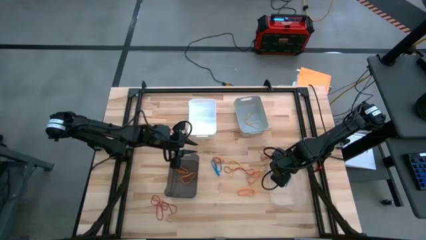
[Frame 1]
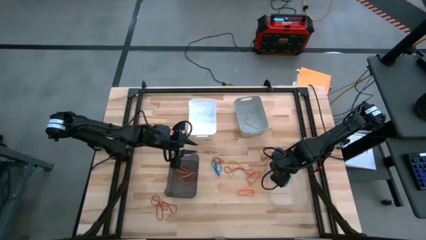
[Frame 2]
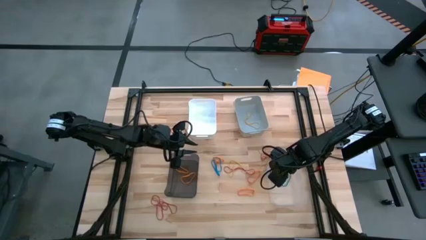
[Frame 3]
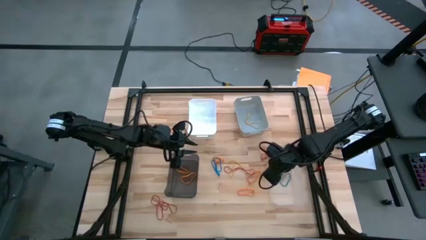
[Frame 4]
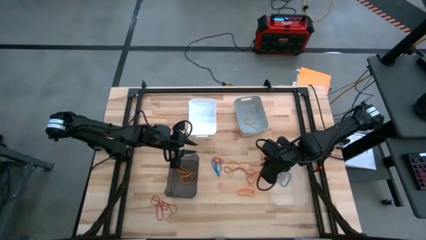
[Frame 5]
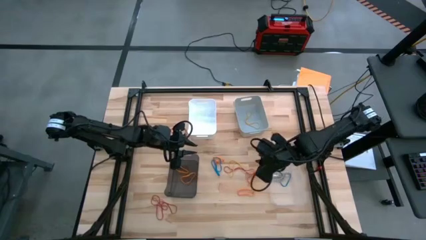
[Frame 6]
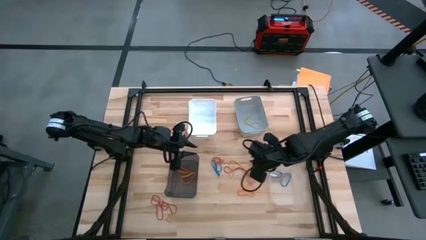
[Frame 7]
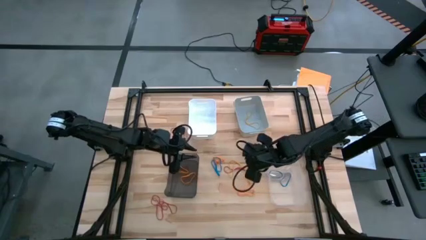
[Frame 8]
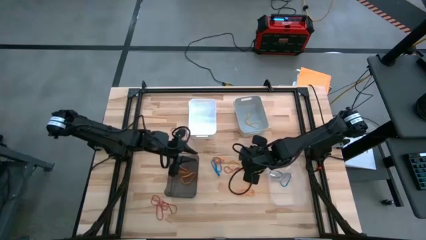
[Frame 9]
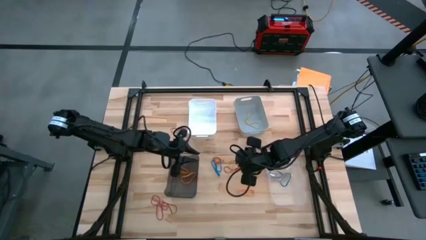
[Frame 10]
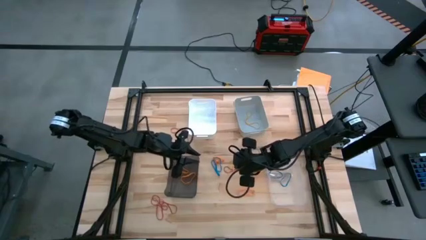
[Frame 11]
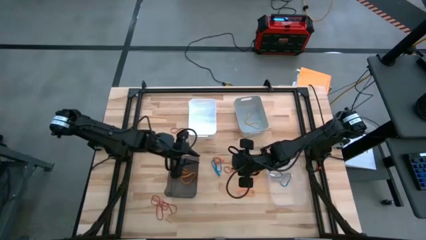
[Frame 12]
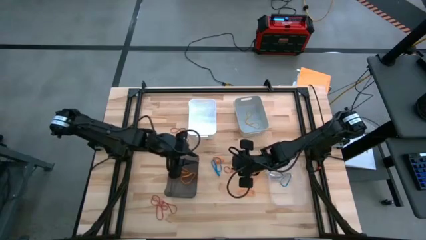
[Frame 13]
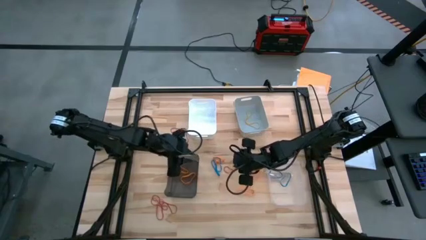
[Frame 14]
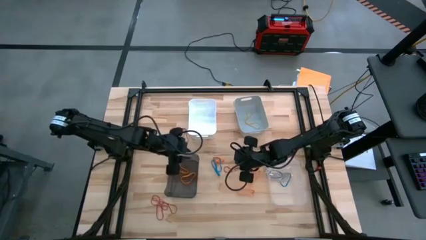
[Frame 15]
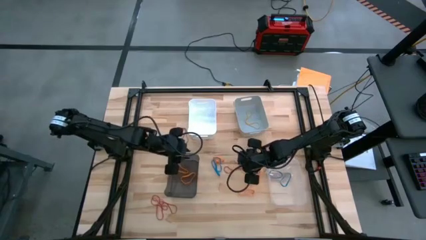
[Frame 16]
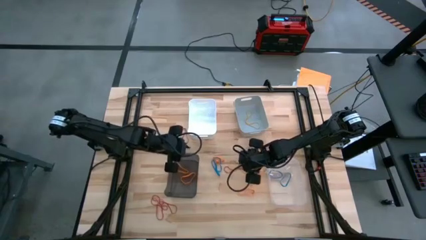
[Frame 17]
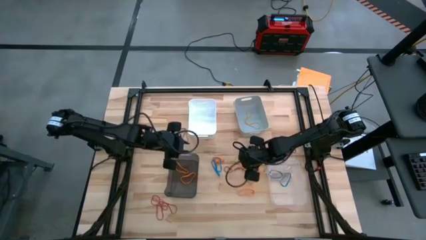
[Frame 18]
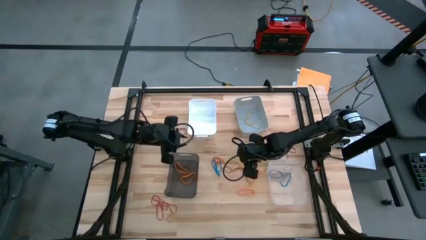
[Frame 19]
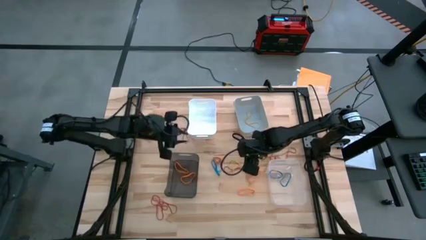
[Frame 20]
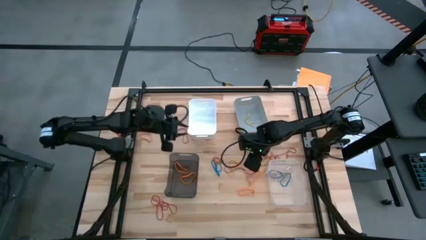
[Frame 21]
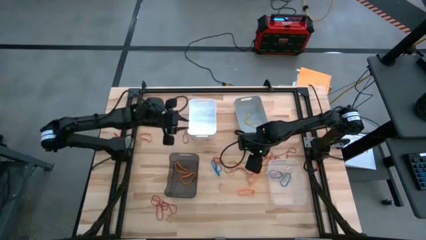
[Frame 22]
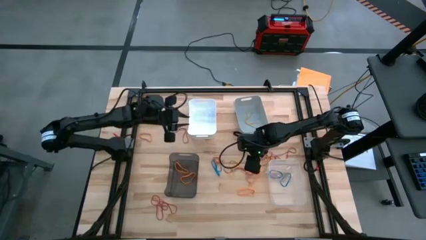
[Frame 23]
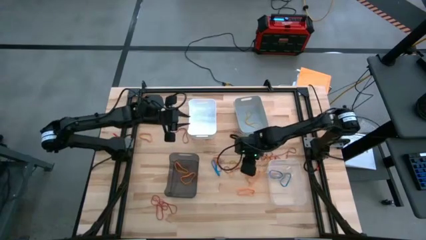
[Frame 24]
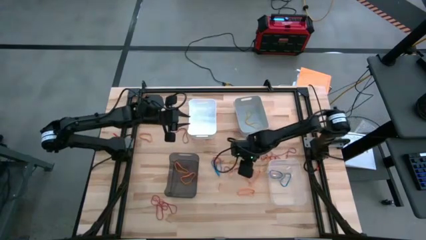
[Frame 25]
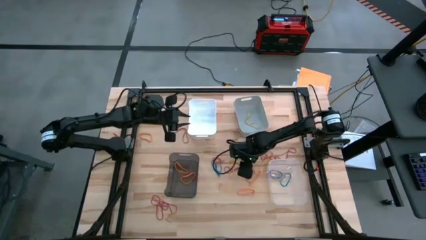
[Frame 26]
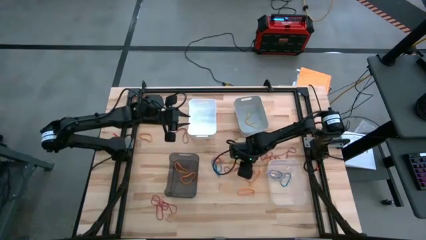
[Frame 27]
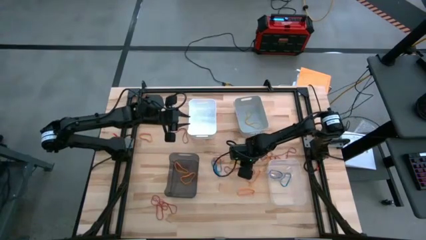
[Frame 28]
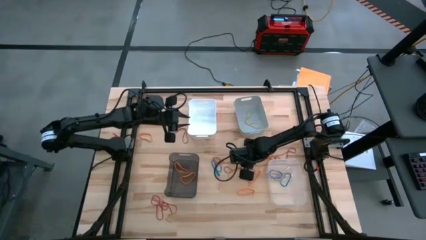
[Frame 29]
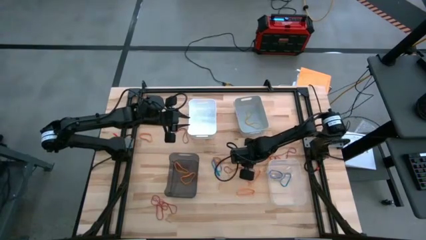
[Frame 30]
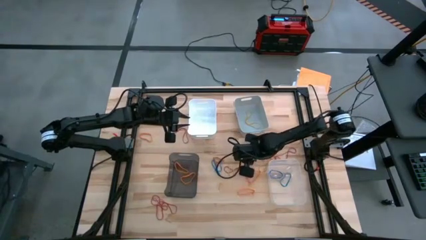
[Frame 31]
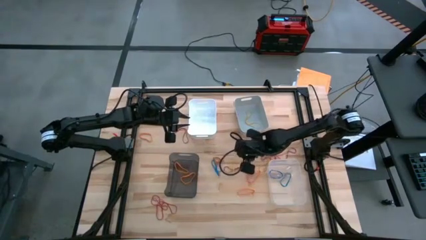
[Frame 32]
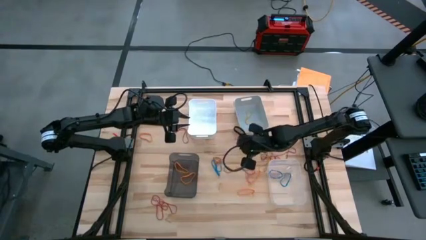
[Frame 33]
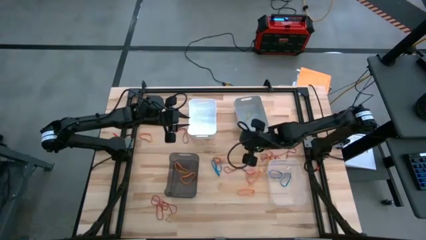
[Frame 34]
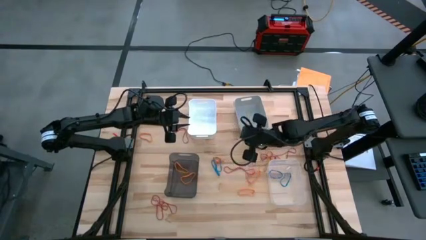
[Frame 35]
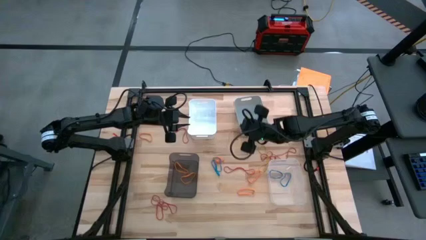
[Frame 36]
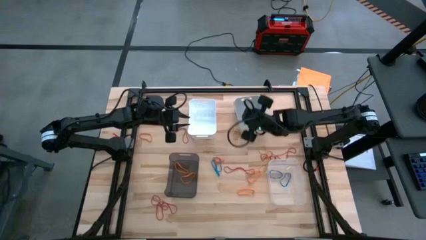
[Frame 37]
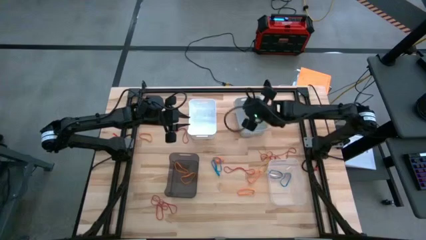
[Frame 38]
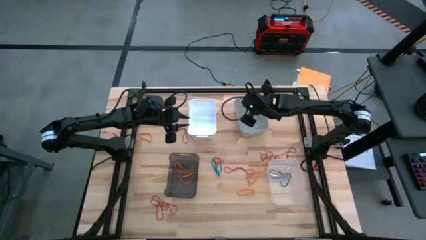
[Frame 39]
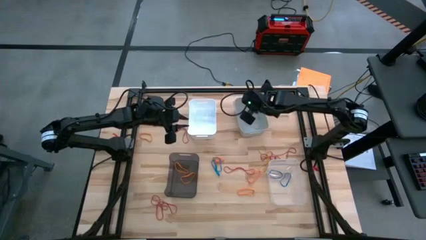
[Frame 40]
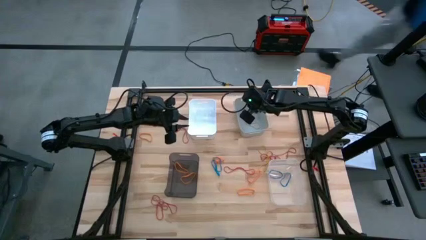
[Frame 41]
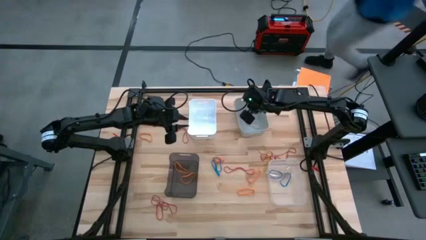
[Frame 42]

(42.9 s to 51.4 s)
Task: Sort rubber bands into baskets
Put the yellow rubber band into the gray bin

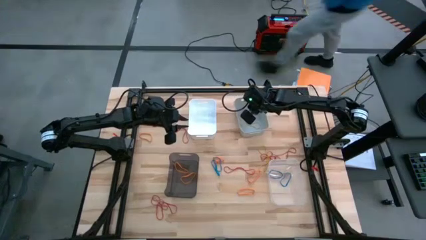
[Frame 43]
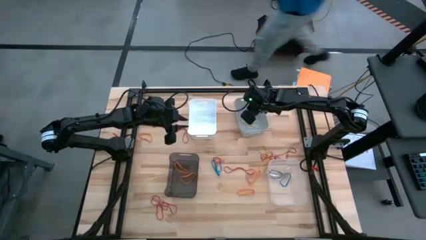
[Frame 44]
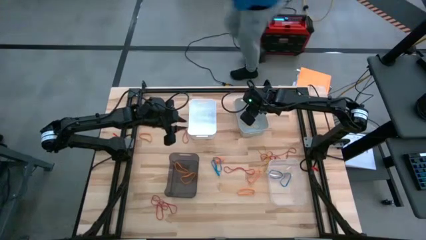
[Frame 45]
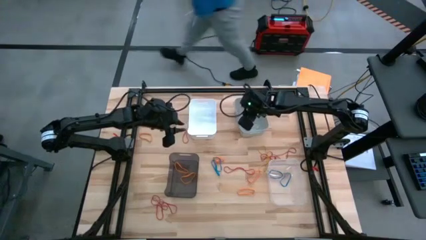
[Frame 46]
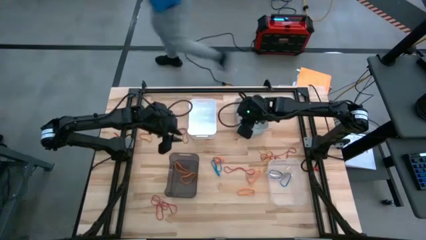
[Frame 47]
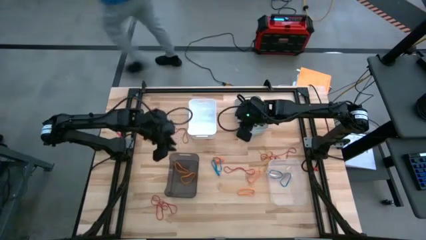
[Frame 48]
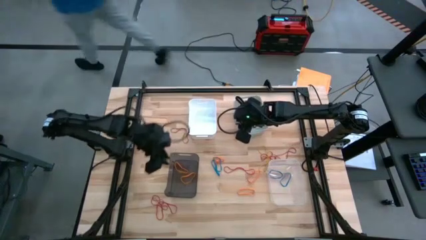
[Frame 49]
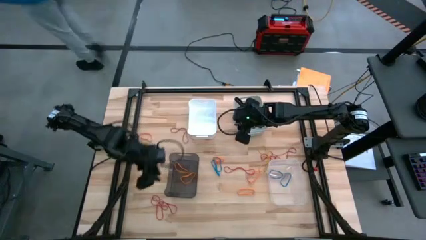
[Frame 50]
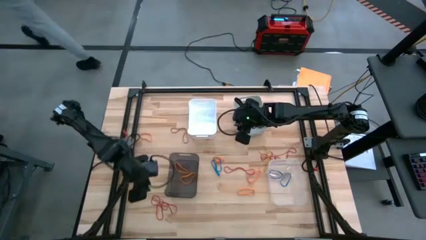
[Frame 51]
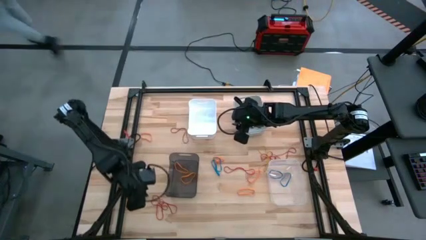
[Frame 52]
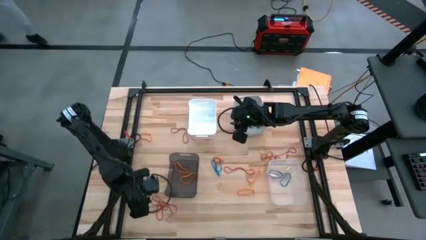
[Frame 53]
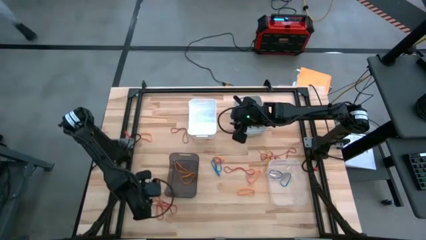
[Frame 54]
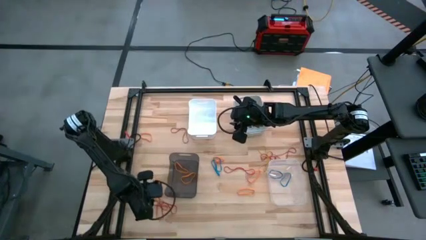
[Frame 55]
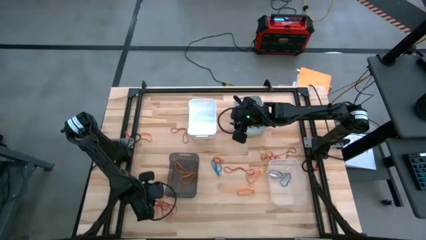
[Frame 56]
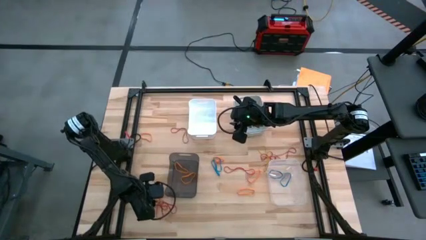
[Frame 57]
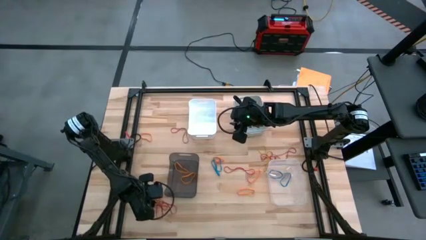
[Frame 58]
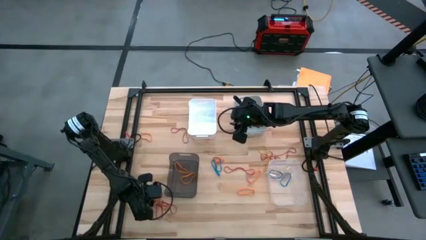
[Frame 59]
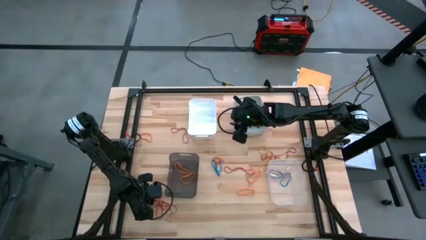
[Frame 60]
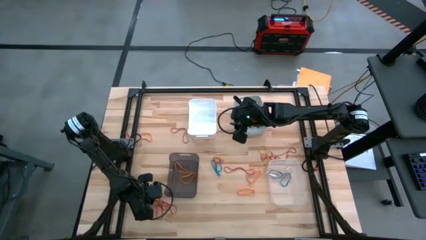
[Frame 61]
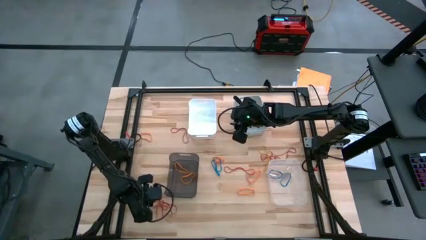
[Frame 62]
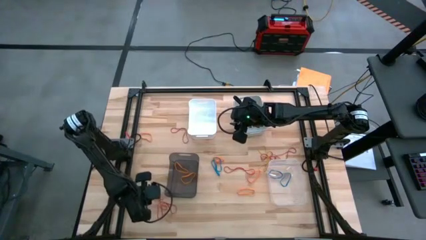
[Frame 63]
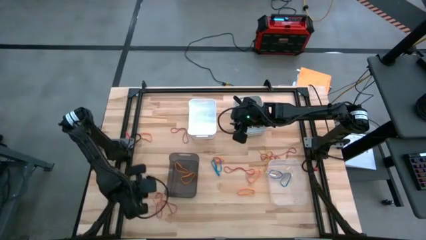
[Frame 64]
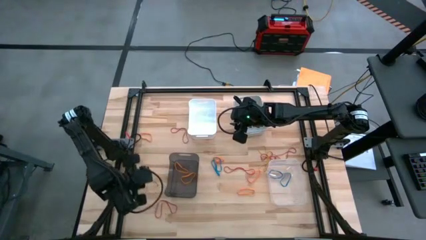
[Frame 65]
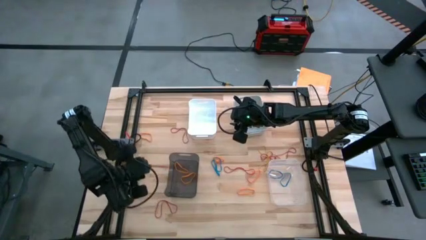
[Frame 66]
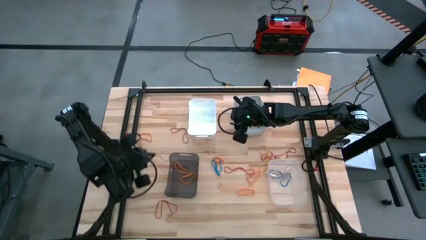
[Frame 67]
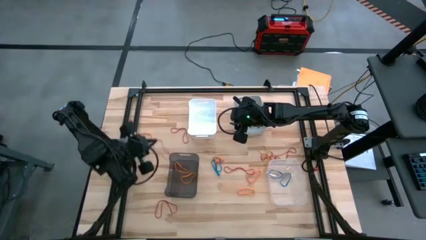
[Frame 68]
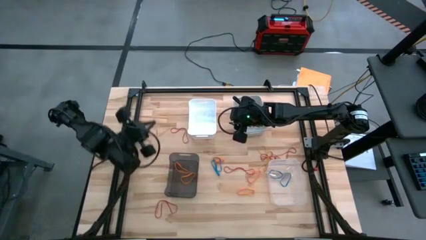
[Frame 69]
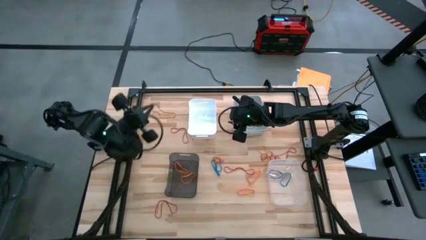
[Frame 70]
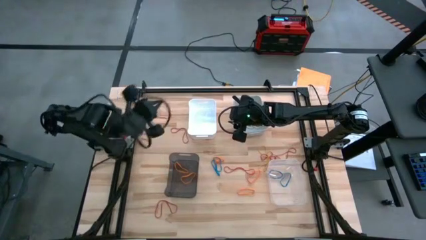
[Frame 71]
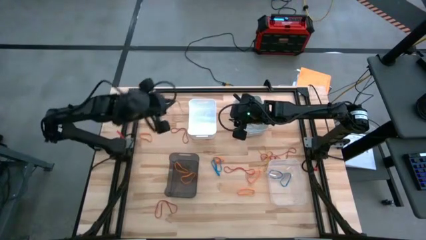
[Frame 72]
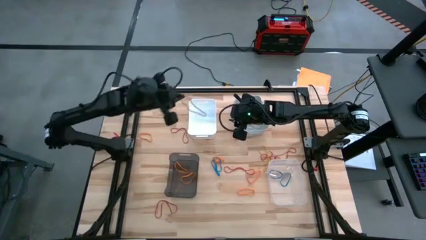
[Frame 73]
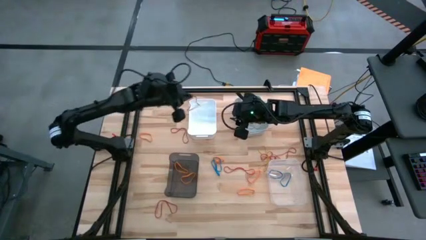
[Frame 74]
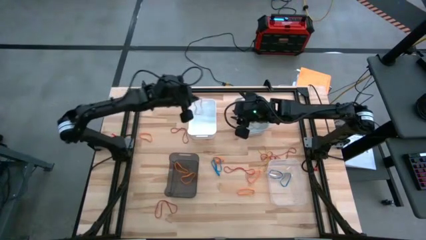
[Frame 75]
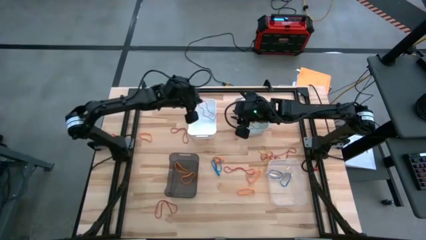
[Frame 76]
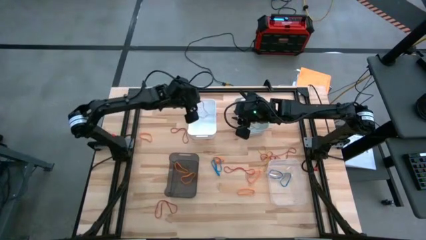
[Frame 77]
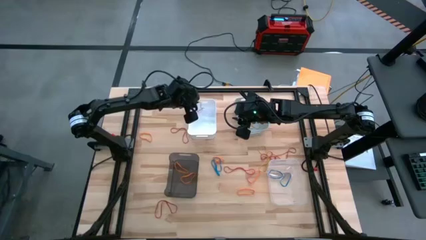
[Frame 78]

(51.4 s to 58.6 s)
Put the red rubber band into the white bin

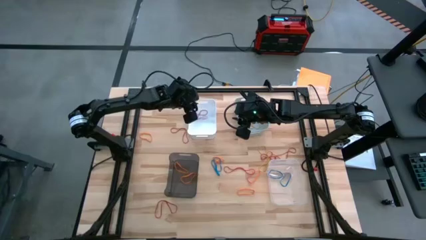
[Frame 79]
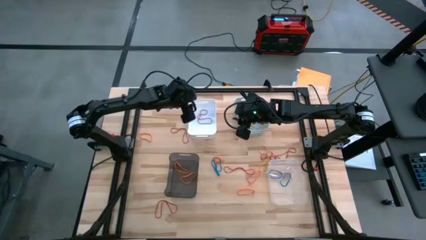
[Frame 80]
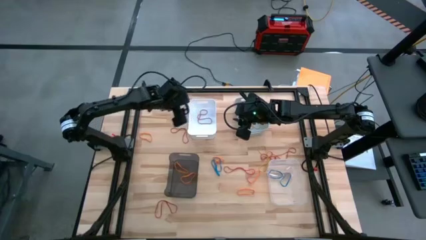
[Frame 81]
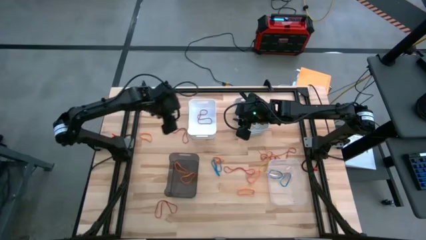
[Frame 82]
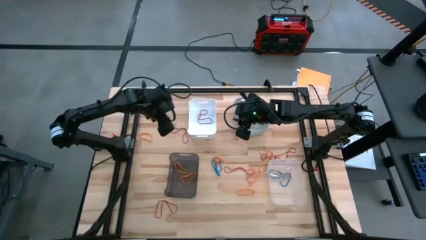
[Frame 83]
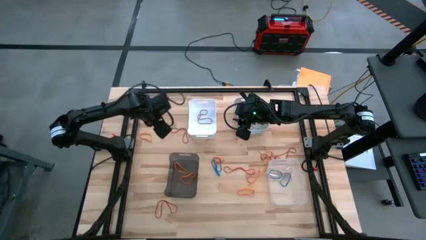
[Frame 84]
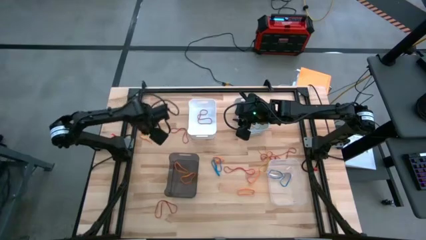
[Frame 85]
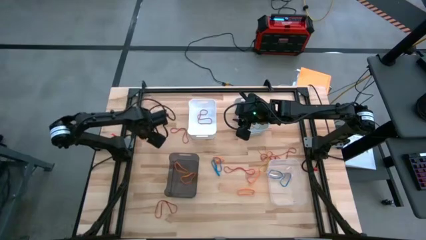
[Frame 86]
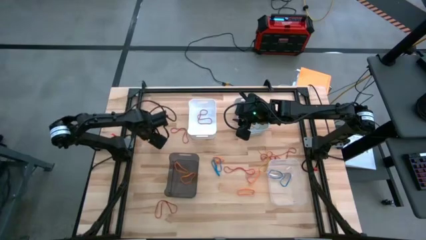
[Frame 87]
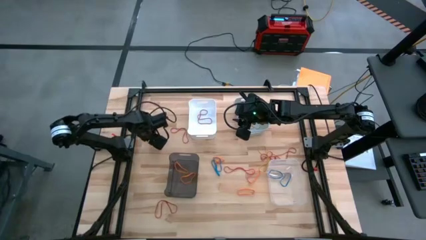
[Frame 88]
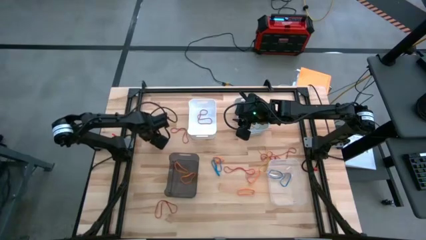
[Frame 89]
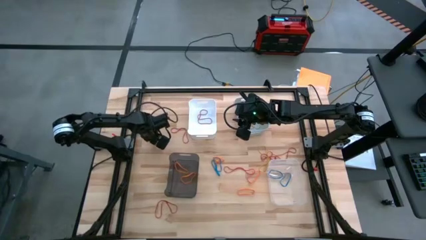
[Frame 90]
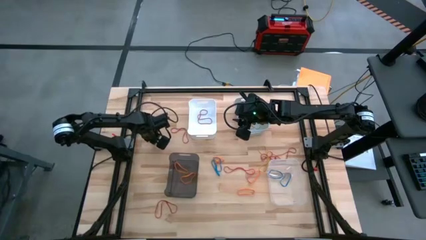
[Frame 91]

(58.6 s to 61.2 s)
Put the orange rubber band into the black bin
